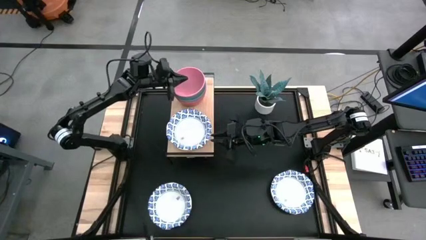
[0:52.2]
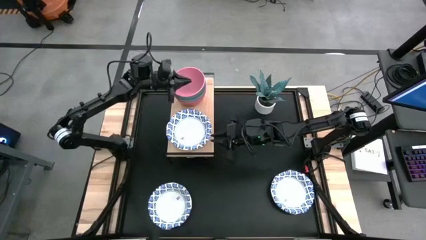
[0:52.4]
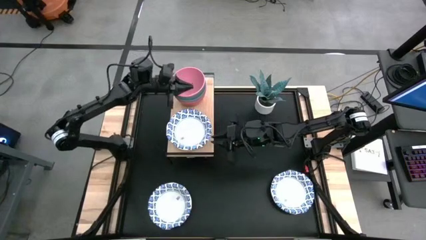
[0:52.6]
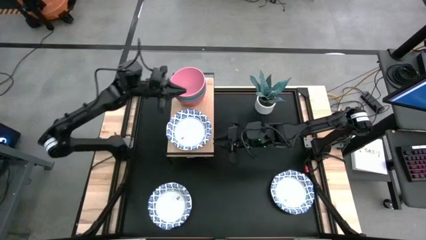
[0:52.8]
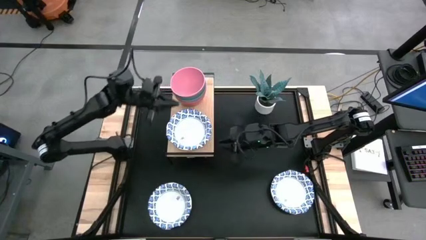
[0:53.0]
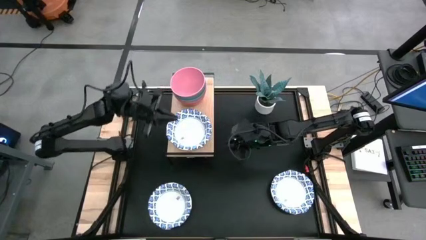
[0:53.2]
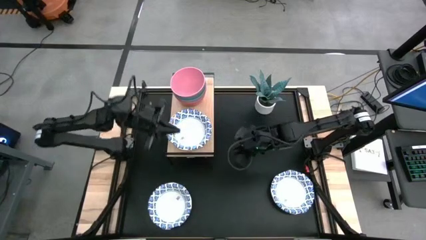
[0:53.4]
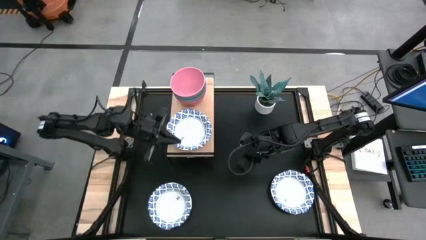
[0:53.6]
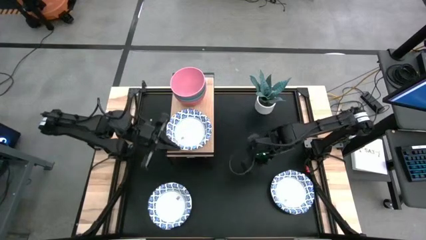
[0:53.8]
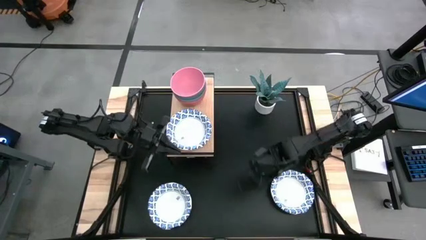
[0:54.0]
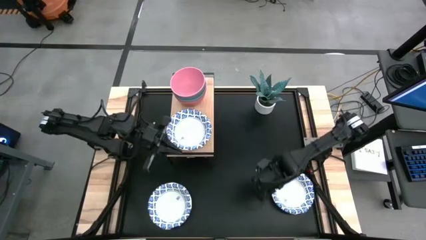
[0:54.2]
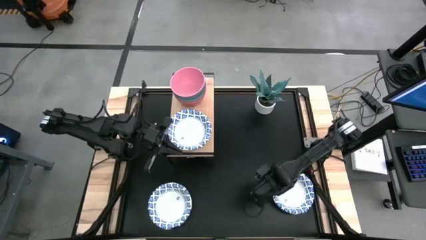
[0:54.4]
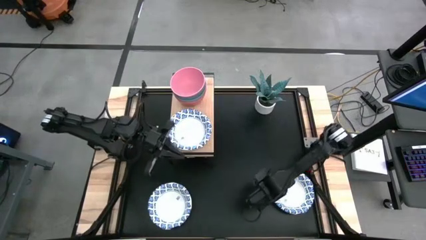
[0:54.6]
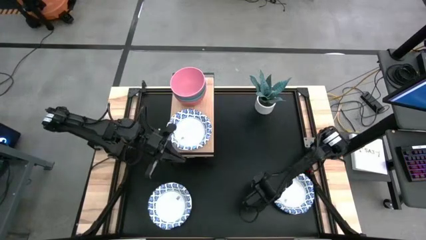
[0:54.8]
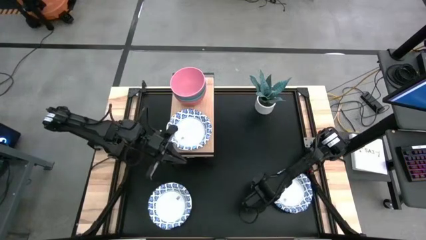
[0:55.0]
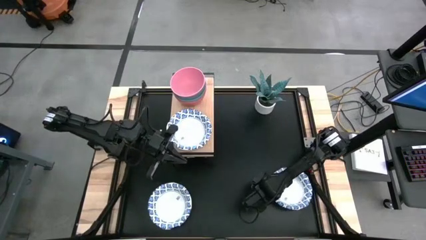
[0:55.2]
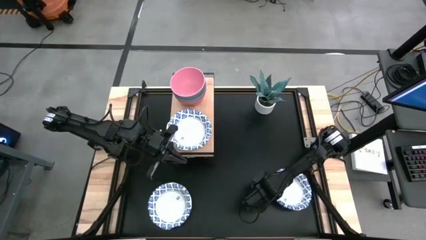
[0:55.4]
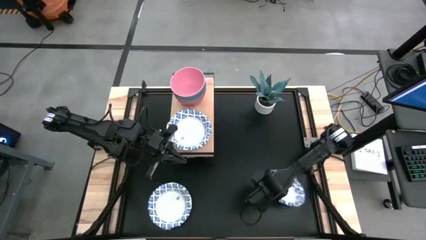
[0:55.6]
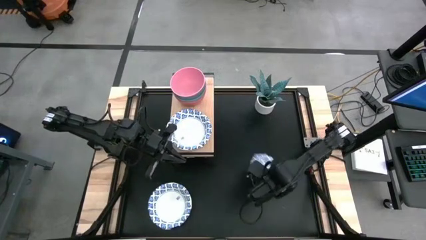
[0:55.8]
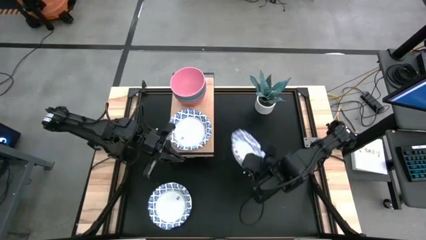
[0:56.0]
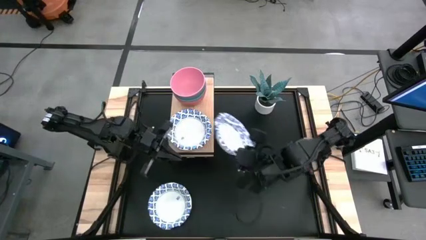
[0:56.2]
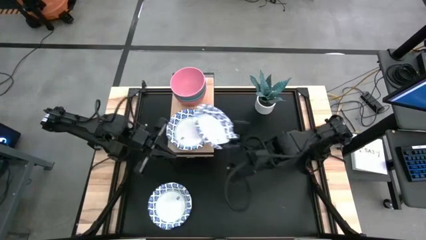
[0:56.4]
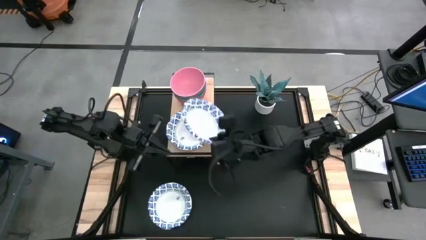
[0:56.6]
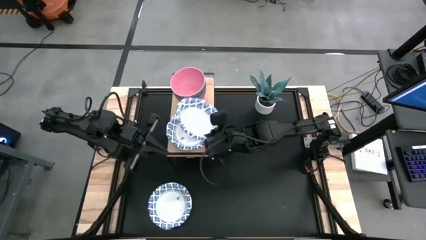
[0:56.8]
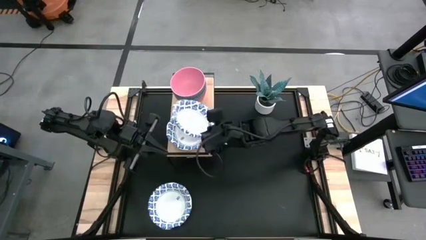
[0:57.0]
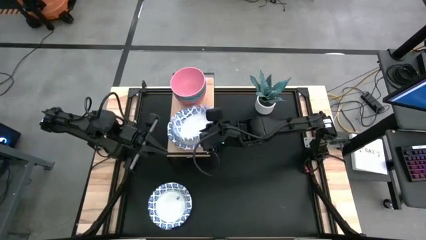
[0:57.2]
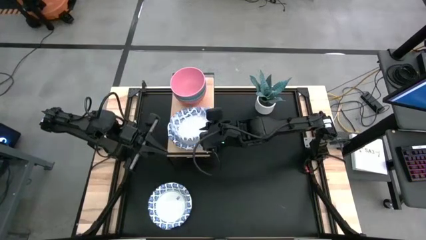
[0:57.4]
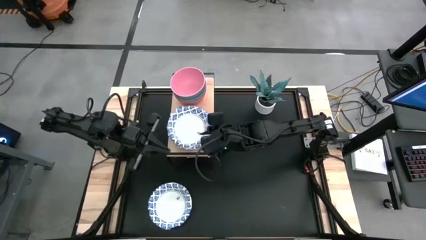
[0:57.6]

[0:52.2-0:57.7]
Task: Place and stack bowls onto a shelf
Stack the white patterned bowl on the other white patterned bowl on the shelf

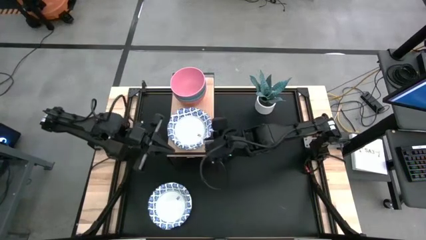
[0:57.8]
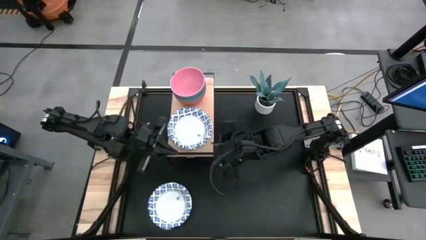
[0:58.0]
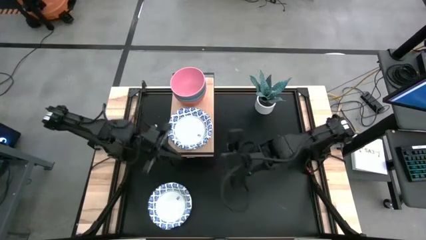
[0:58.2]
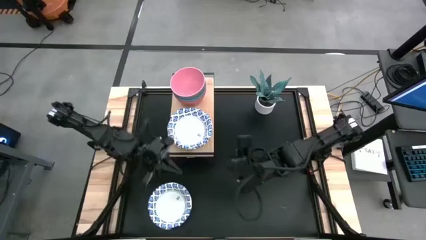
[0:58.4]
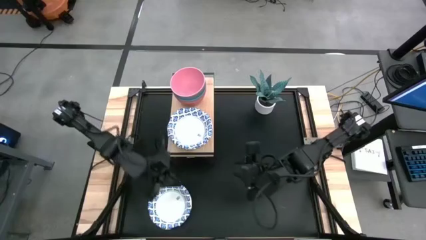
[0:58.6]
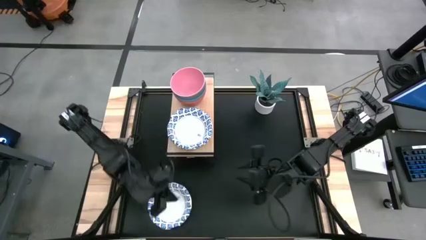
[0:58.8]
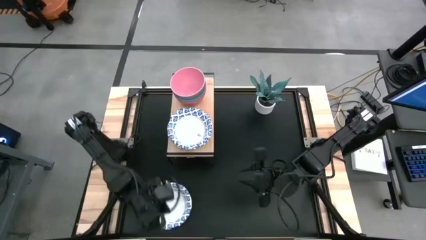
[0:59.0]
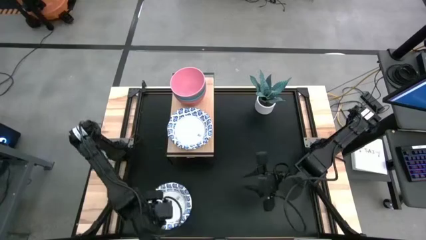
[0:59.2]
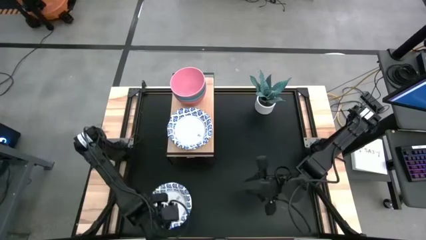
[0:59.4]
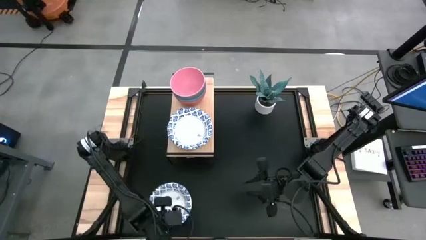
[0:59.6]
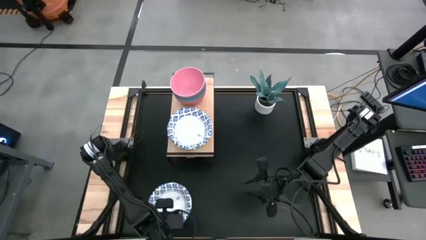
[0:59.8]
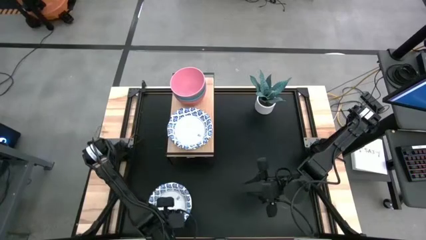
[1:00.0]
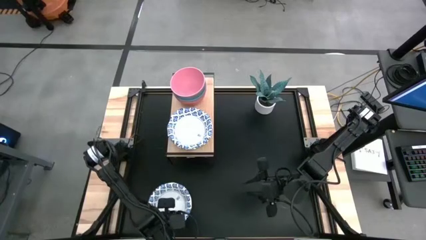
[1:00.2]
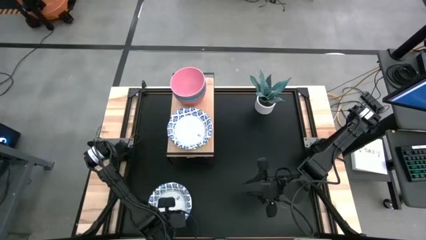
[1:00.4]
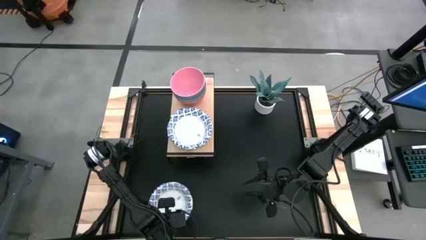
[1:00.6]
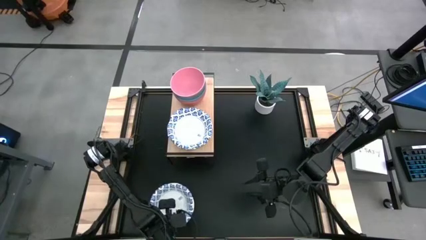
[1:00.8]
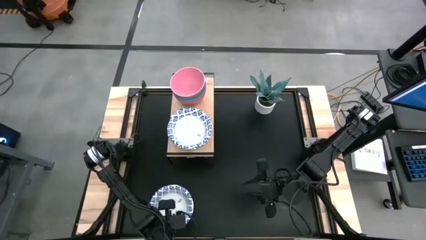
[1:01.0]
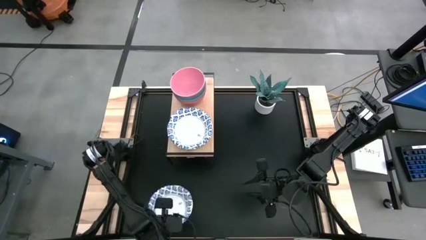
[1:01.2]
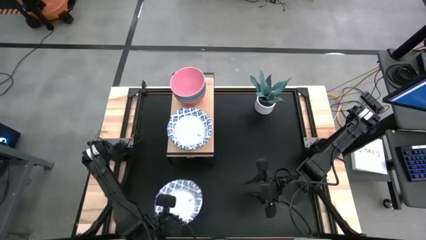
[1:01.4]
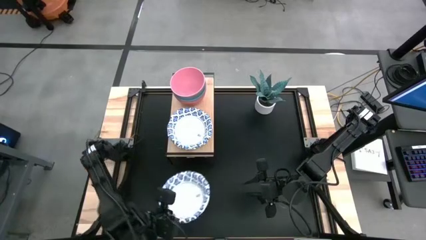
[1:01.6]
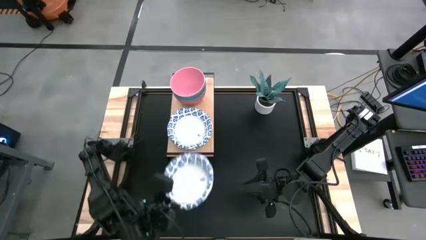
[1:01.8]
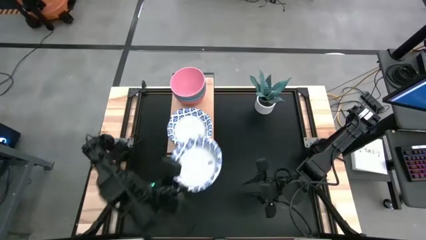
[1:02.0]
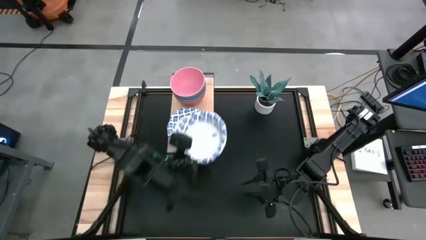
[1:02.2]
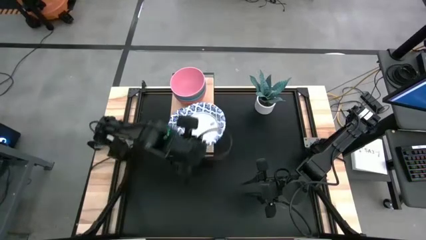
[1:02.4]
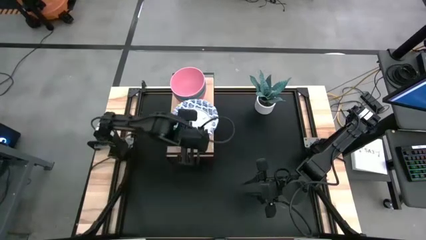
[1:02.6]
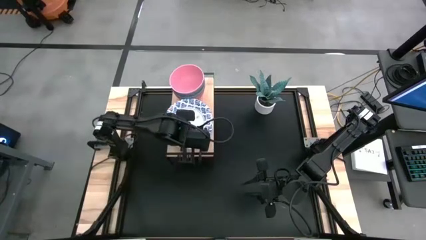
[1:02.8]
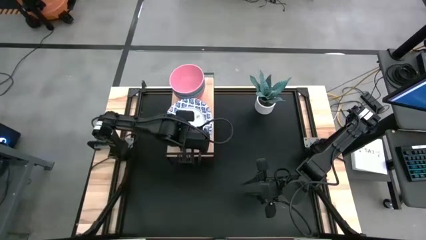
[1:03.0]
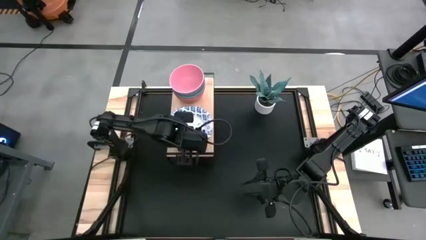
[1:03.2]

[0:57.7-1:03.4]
Stack the white patterned bowl on the other white patterned bowl on the shelf

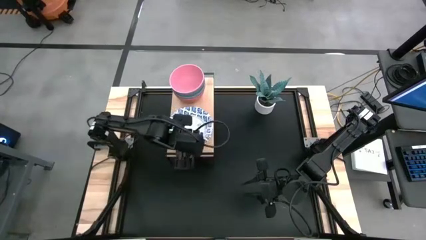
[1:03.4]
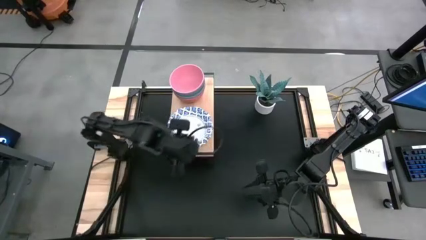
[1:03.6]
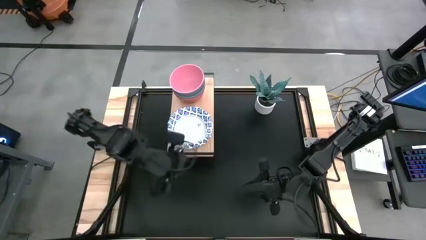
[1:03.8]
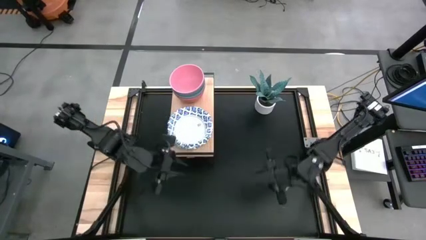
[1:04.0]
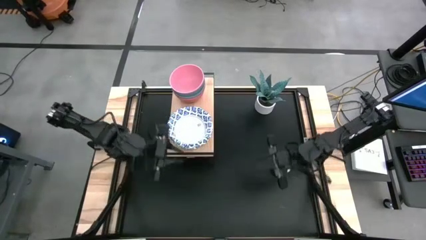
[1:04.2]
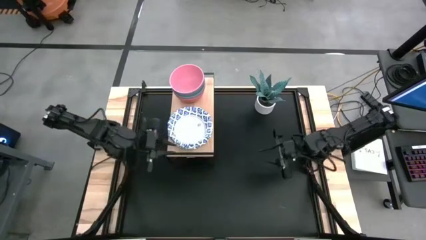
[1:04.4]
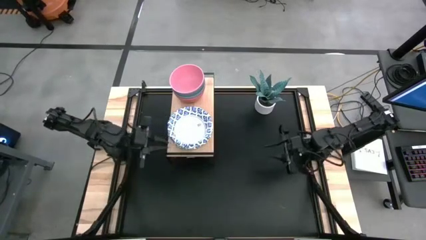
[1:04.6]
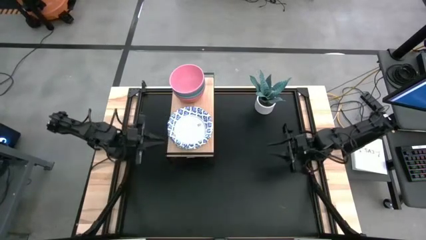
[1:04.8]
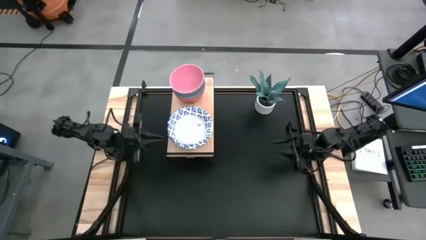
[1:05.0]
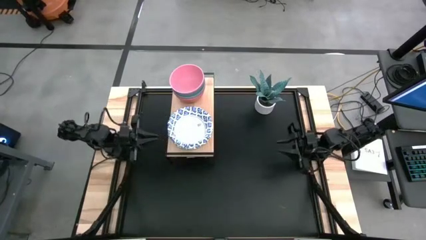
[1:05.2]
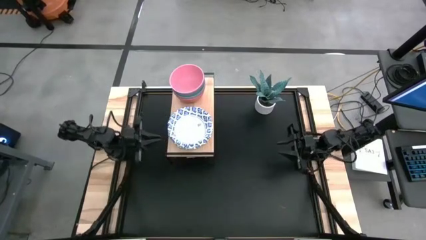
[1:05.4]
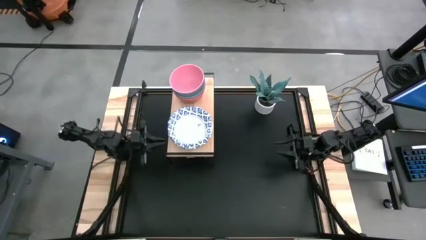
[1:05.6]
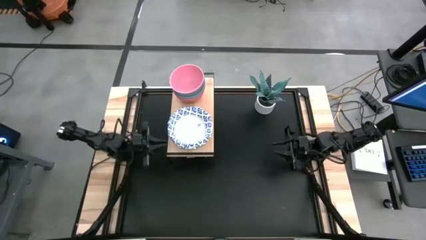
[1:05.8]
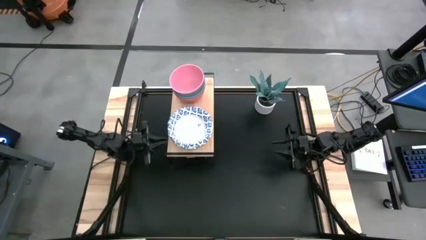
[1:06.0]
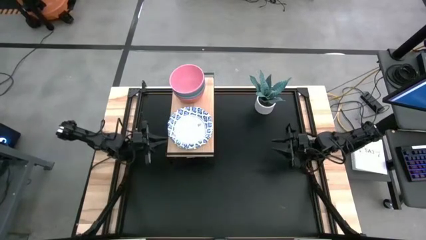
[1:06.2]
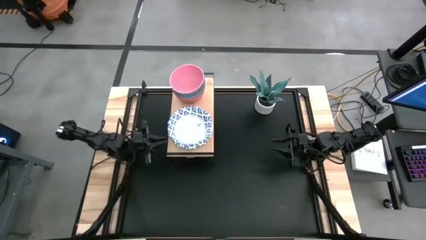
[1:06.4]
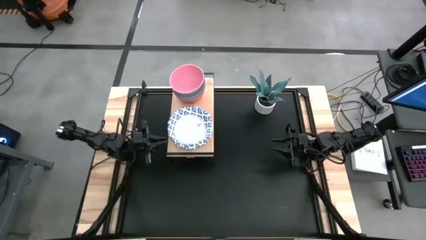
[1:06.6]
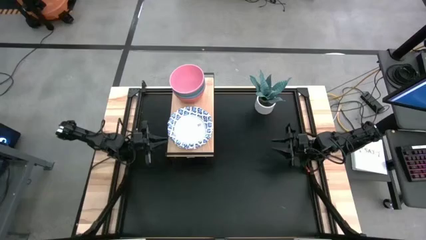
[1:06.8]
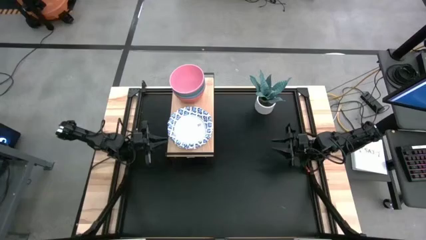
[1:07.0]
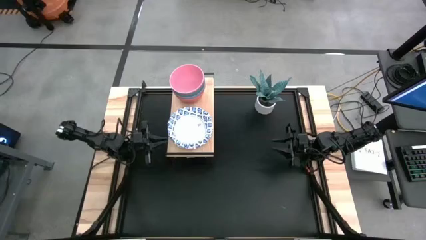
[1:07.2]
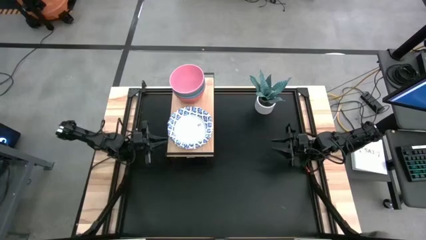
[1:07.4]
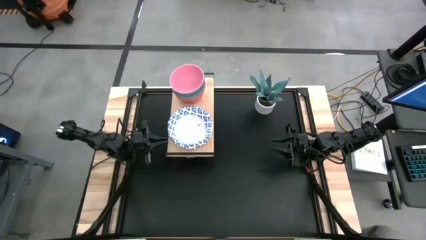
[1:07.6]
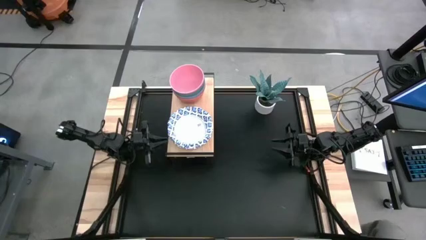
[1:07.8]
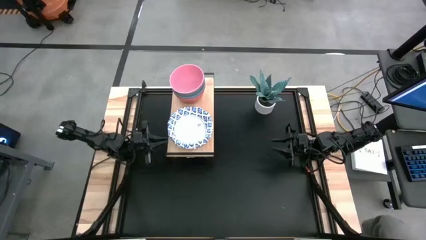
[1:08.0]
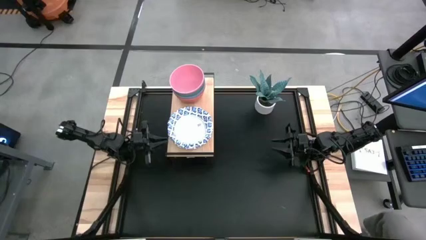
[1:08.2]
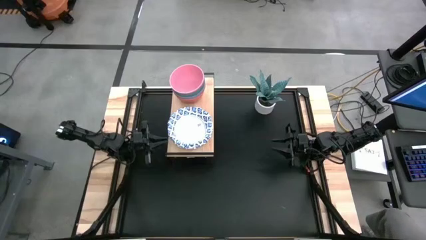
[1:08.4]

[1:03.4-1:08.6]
Return to Home Position
